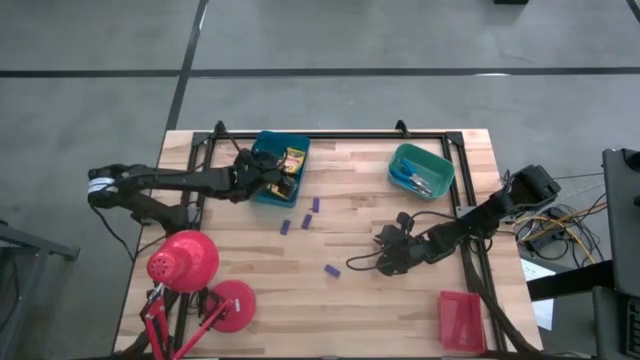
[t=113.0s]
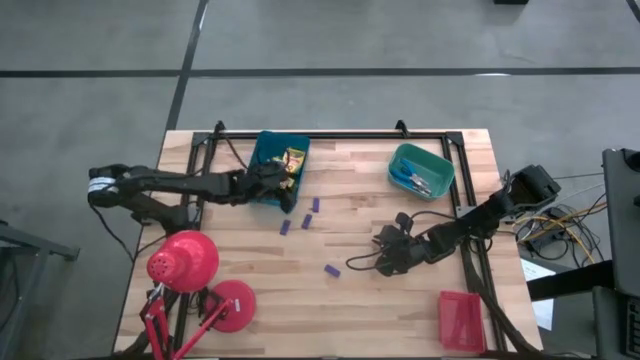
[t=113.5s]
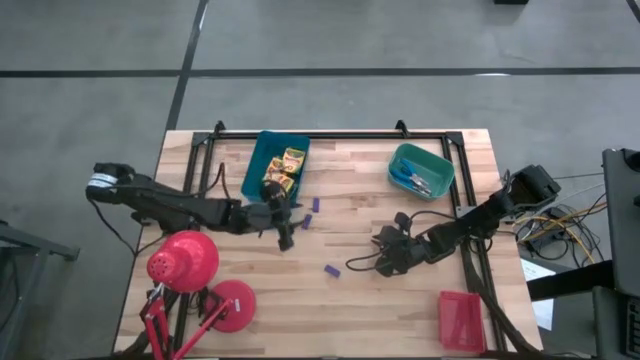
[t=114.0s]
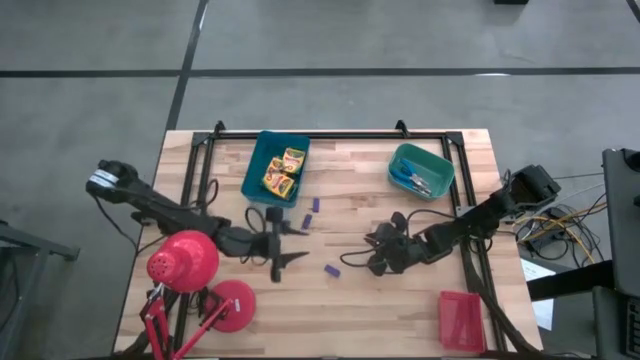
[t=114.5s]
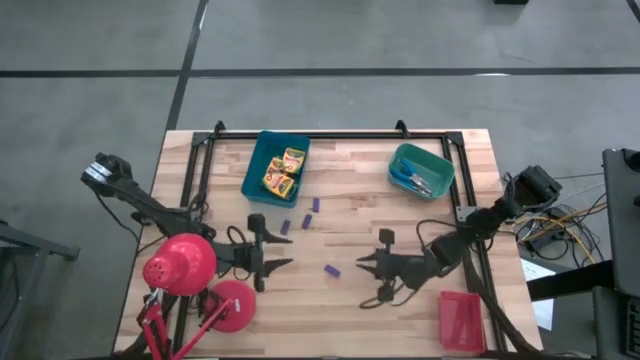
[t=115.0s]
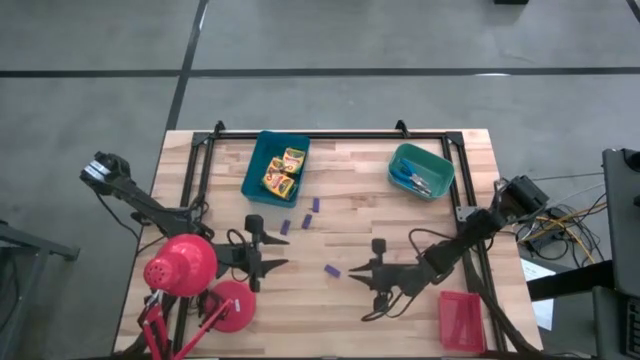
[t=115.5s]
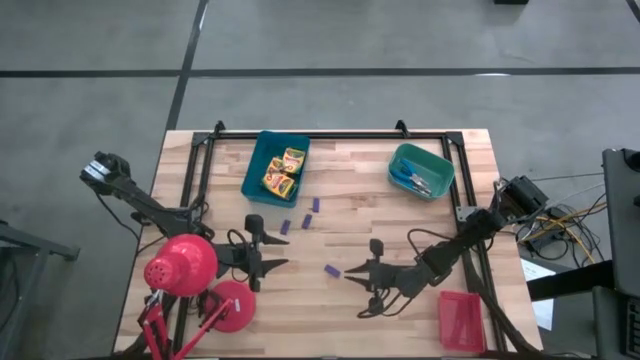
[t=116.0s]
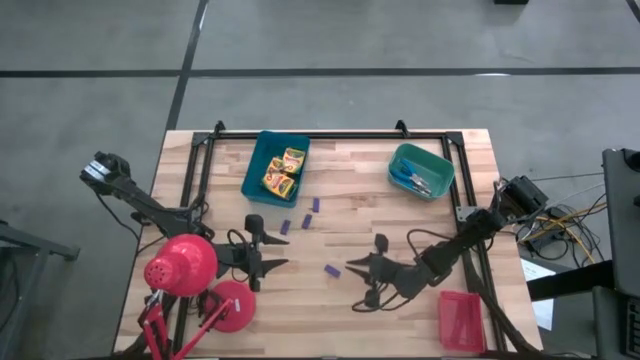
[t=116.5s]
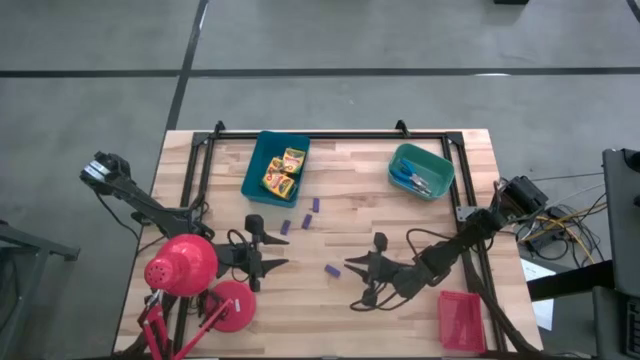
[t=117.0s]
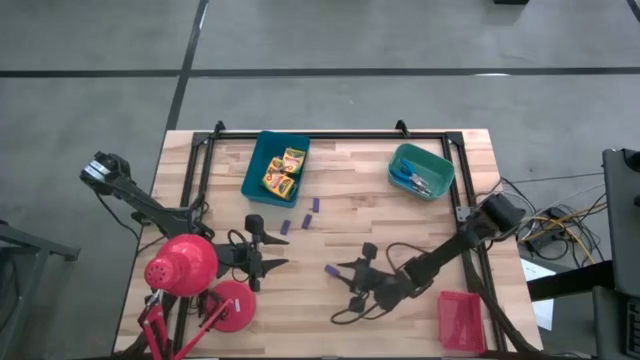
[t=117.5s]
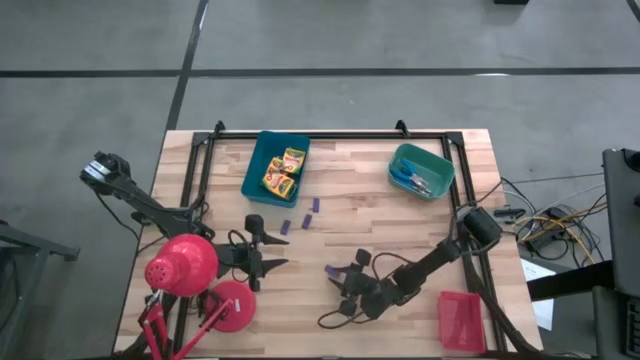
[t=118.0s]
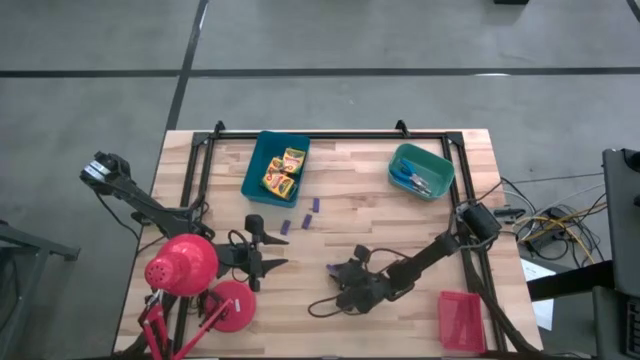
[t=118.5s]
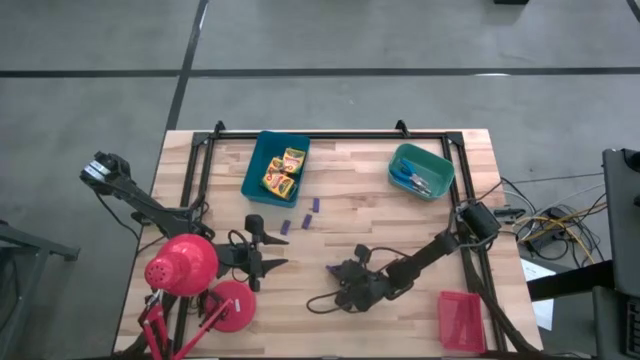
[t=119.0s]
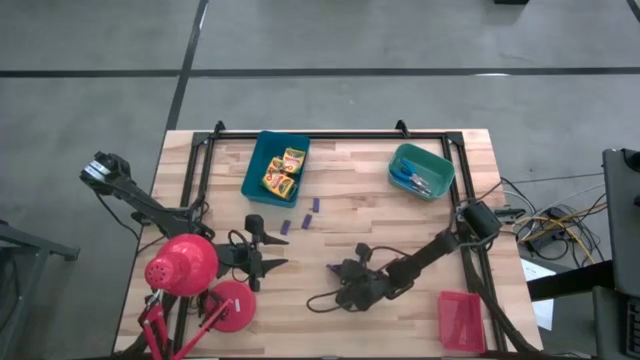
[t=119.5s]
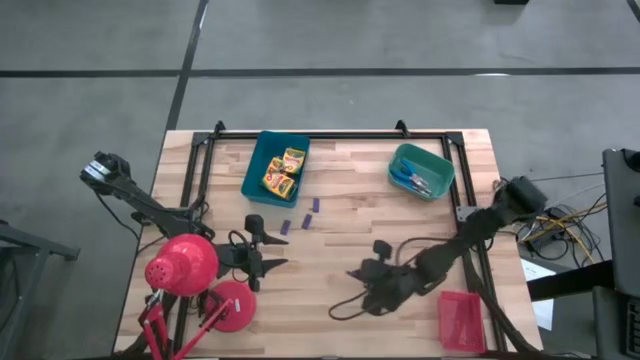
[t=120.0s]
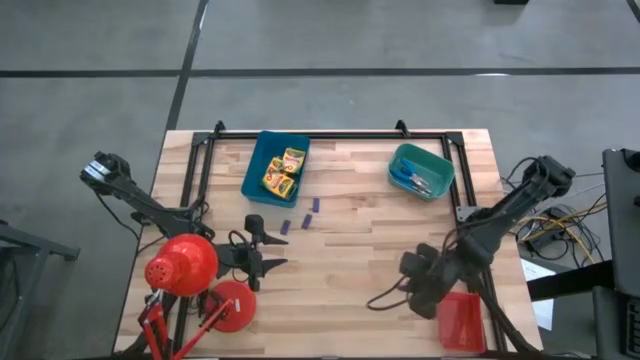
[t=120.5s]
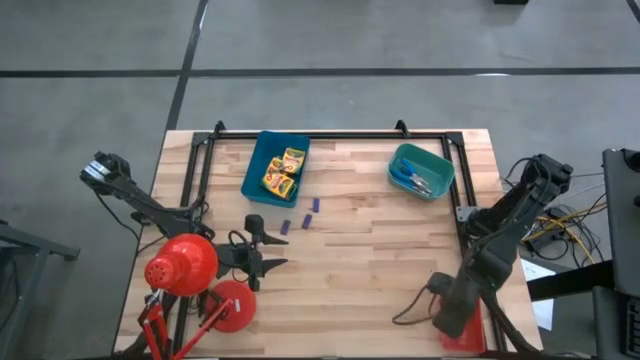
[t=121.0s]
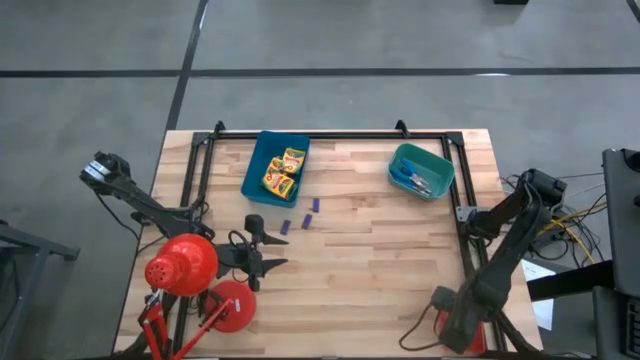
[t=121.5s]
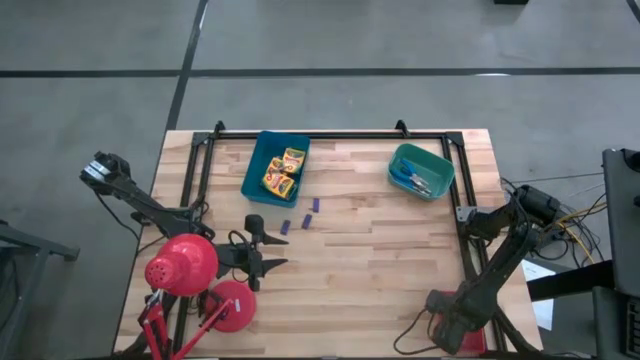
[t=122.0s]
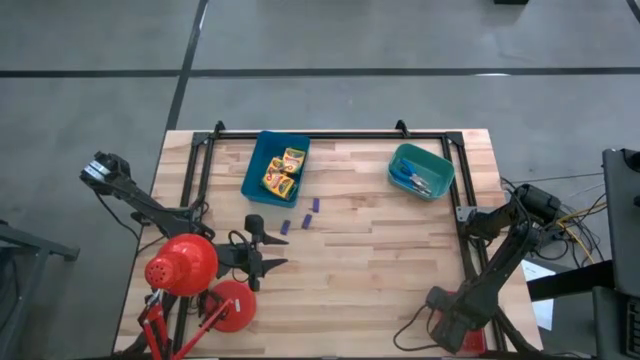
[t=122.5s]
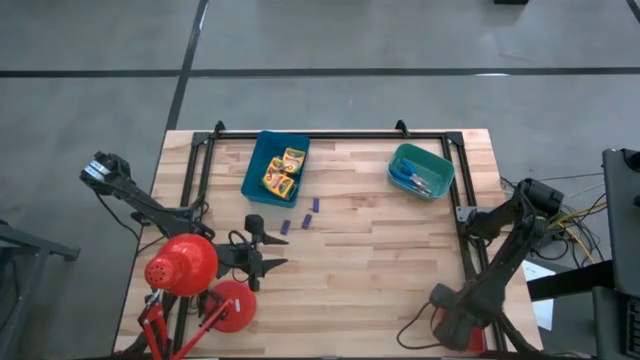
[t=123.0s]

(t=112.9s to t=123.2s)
Task: Pick & Place School Supplies
Put the purple eraser into the red bin

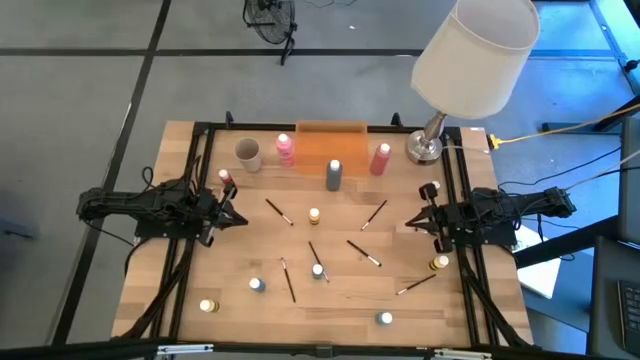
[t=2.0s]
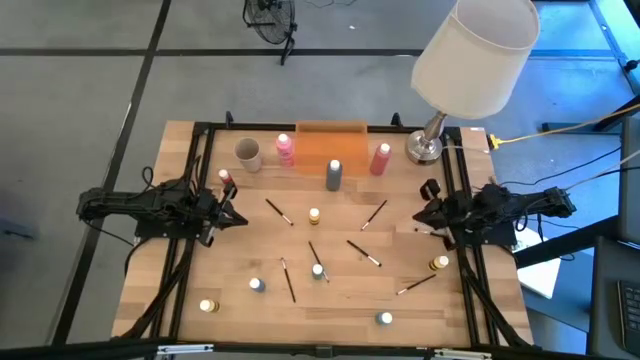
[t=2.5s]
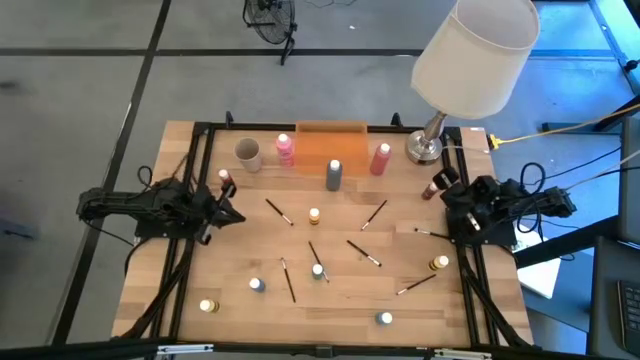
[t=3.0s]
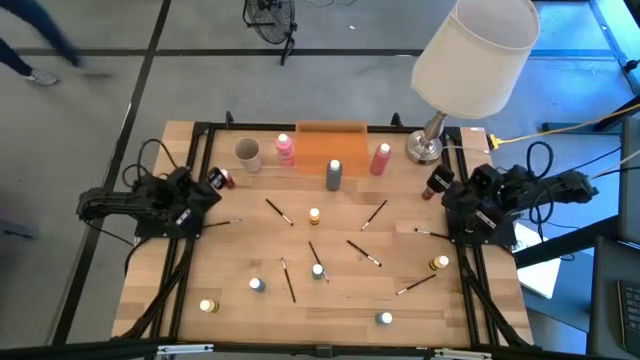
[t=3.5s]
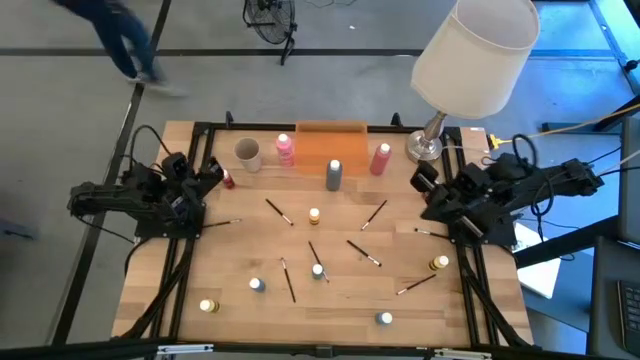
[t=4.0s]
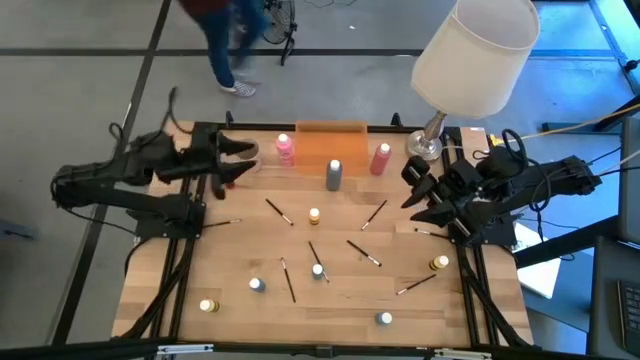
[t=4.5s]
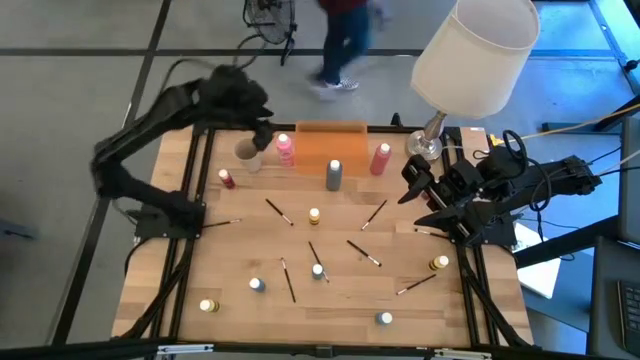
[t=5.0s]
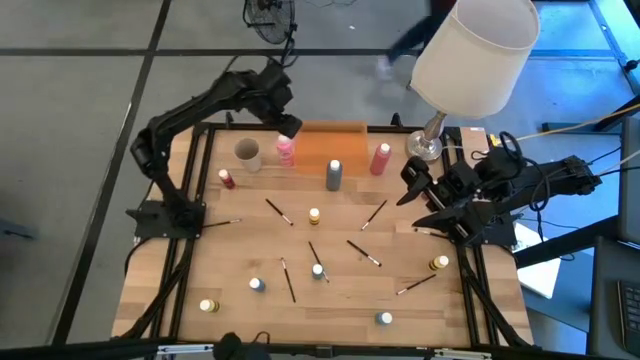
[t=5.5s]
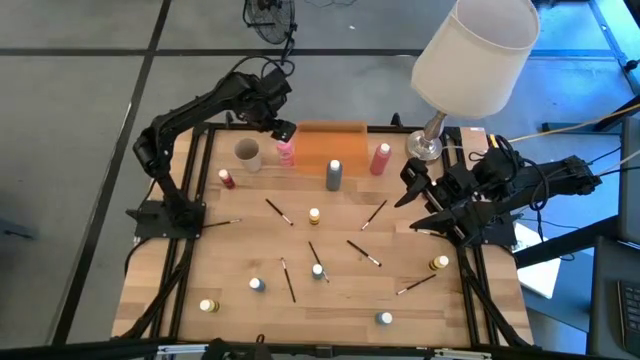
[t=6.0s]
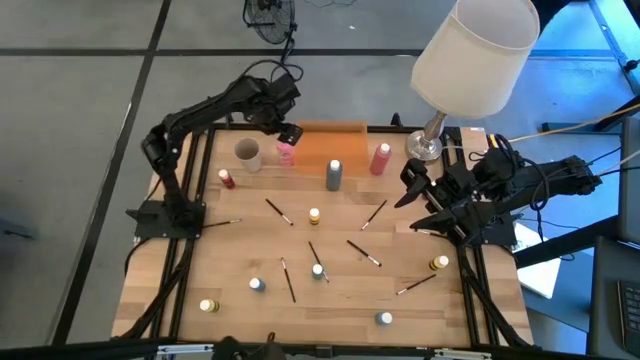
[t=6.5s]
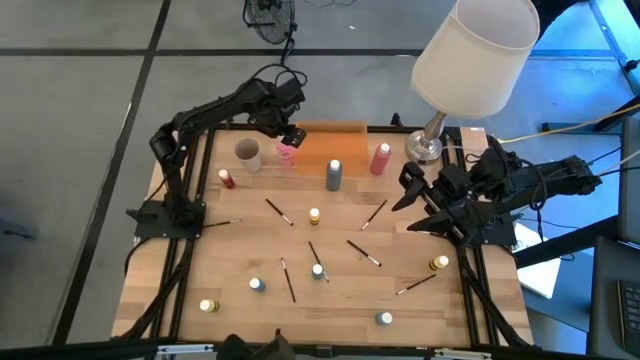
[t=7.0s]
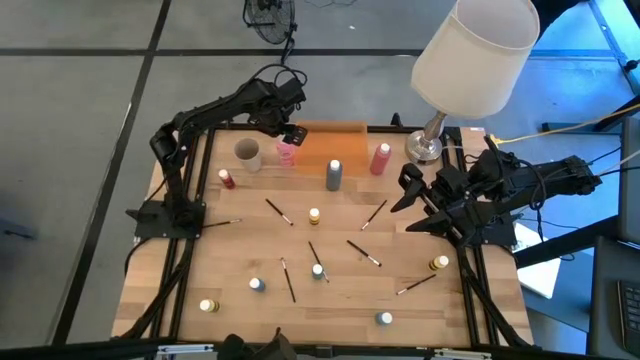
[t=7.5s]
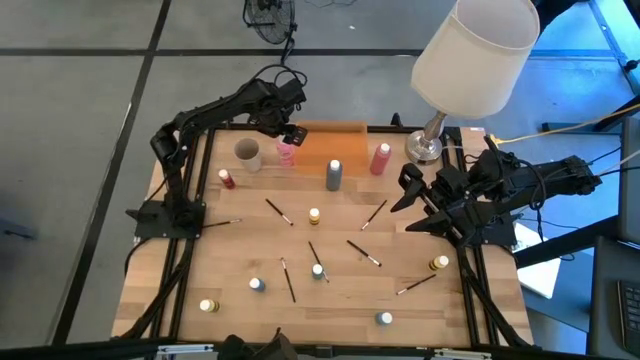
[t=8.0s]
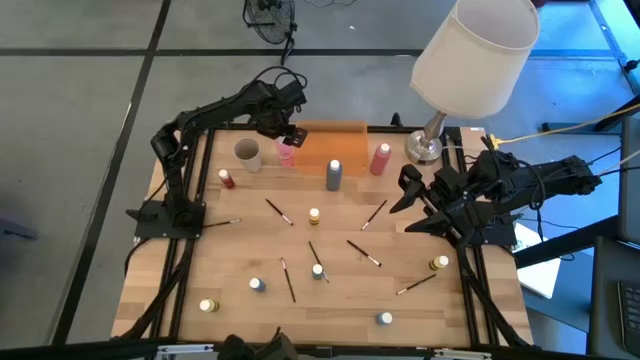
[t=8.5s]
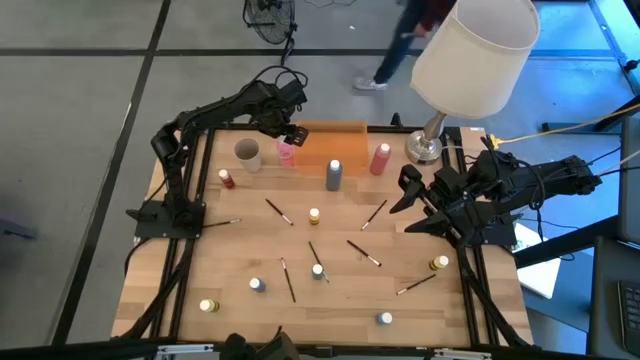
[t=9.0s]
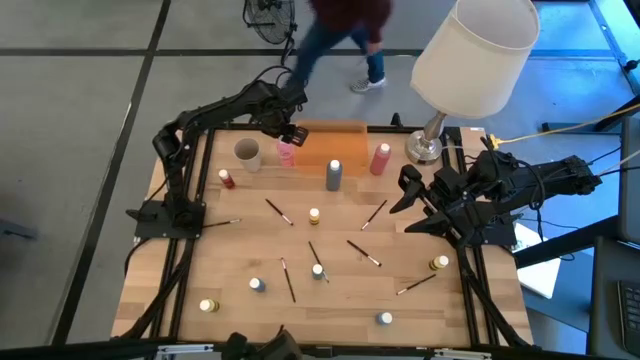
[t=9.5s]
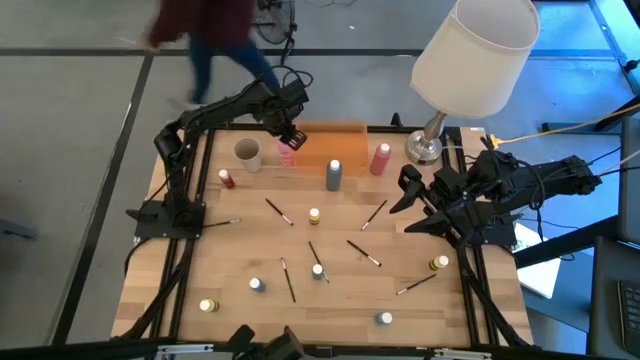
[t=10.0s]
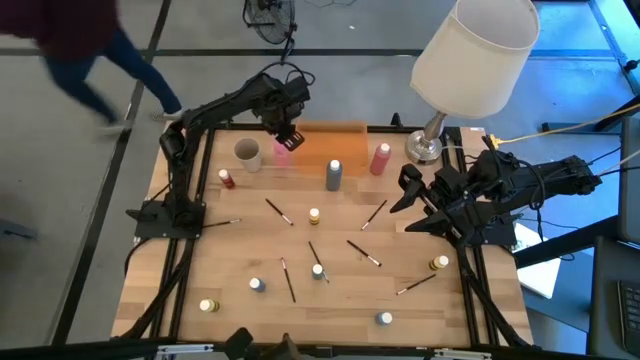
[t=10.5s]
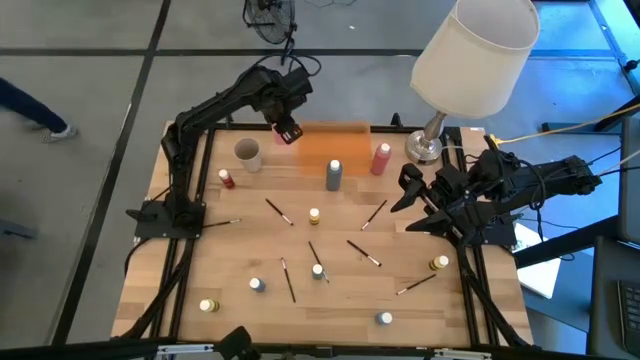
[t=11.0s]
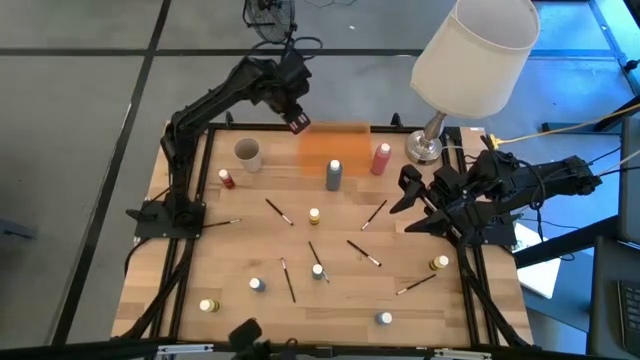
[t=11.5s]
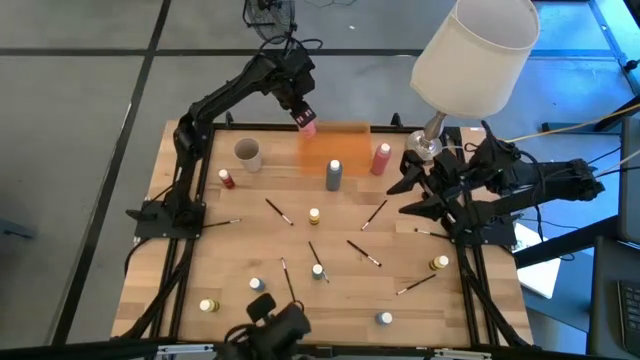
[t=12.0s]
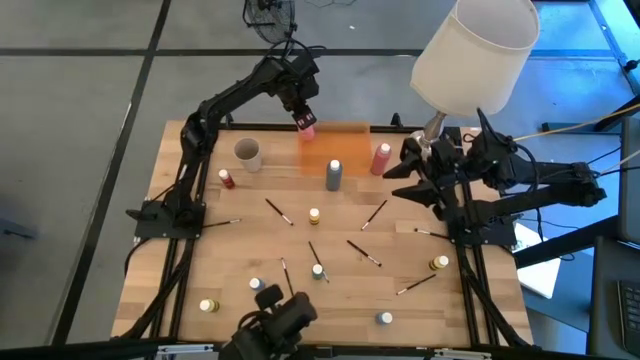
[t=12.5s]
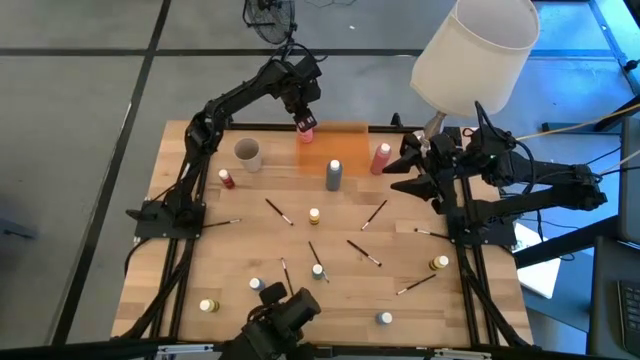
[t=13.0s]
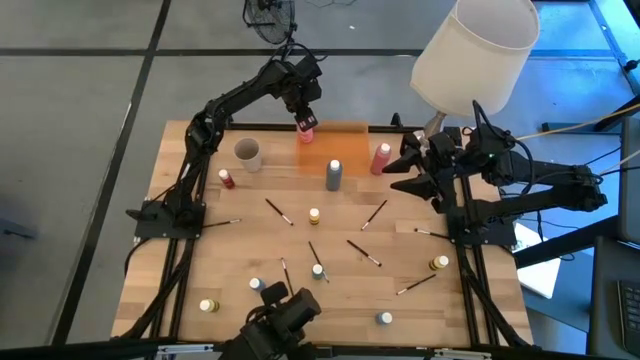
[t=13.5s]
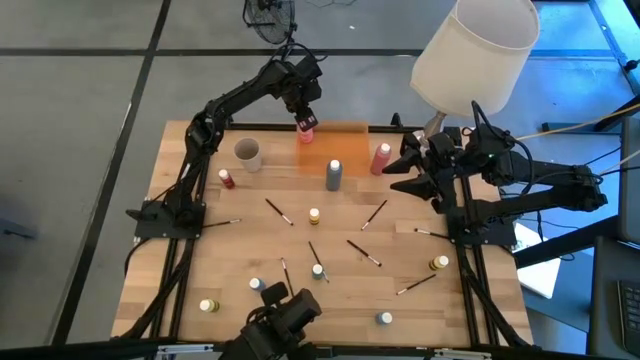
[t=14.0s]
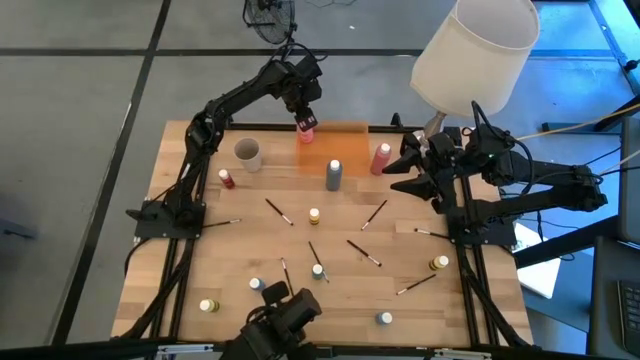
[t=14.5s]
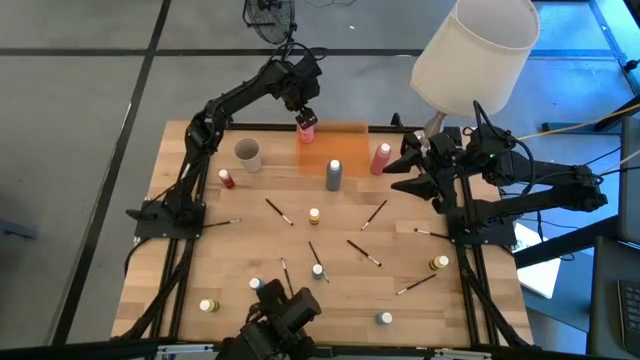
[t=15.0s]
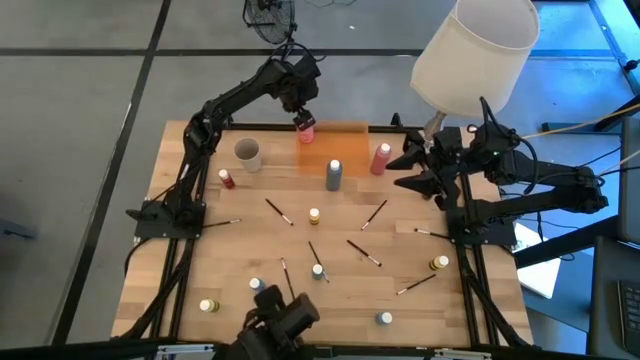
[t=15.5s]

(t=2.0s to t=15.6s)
Task: Pick & Place Paint Supplies
Put the pink paint bottle into the orange bin
